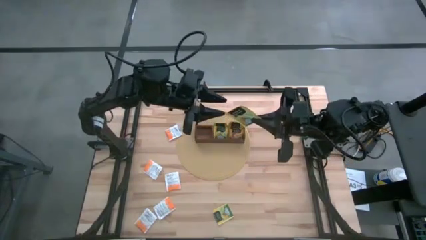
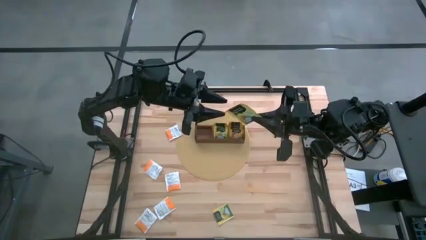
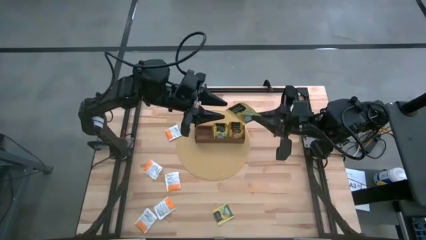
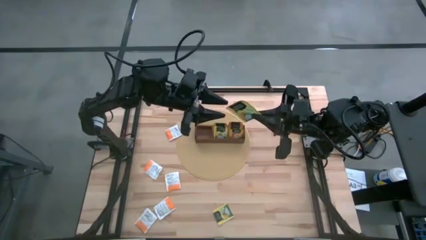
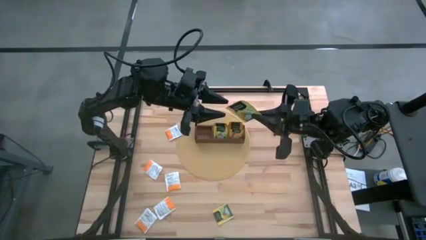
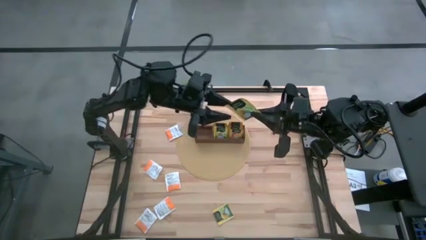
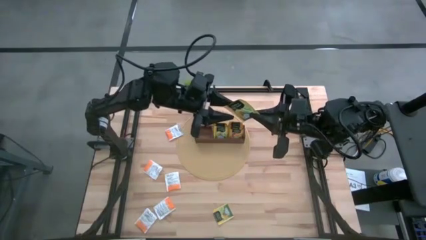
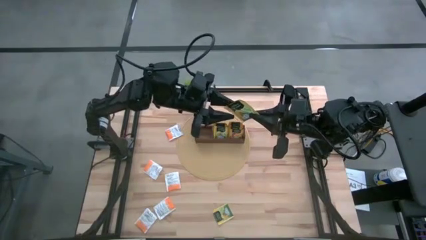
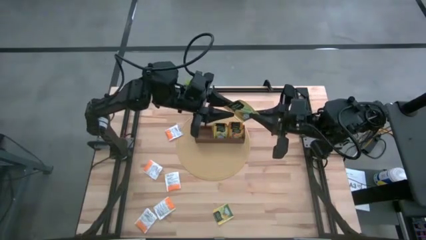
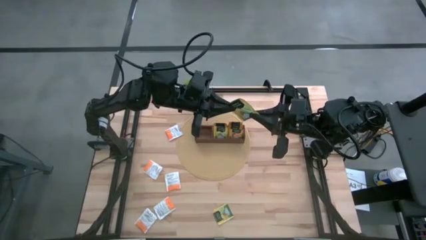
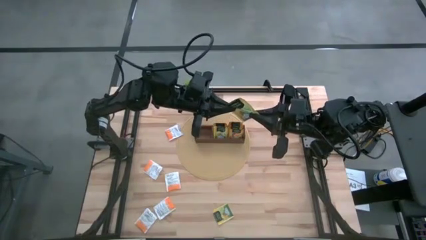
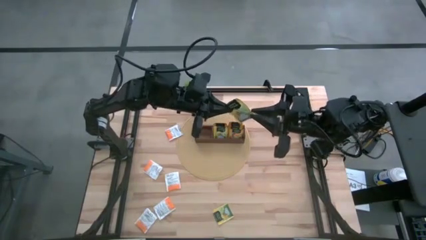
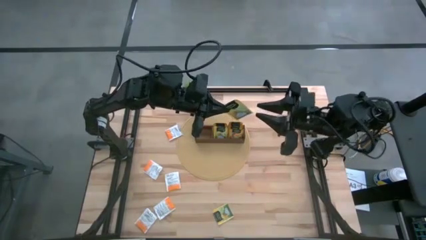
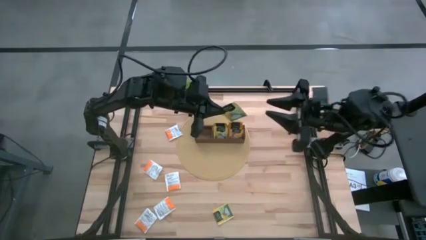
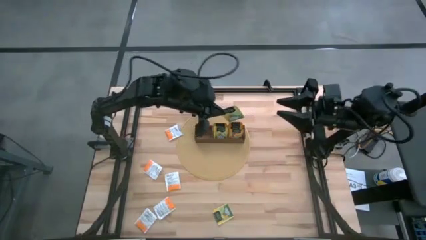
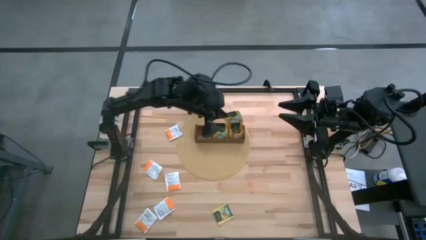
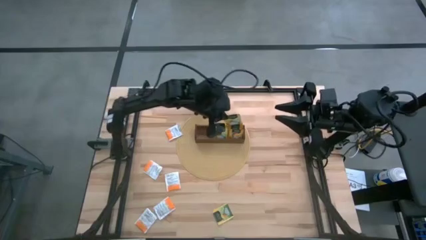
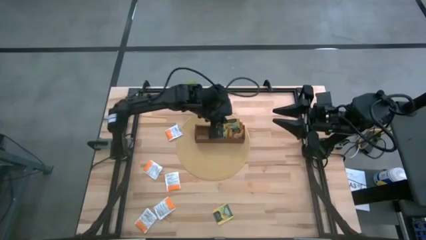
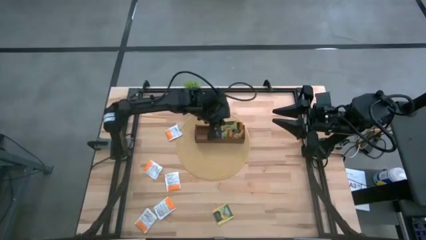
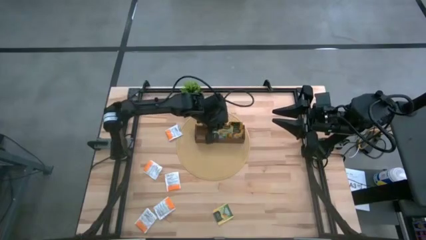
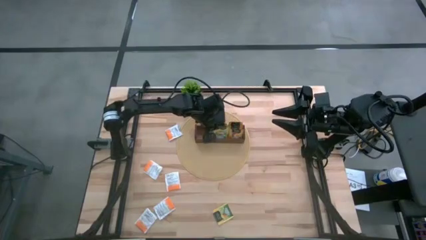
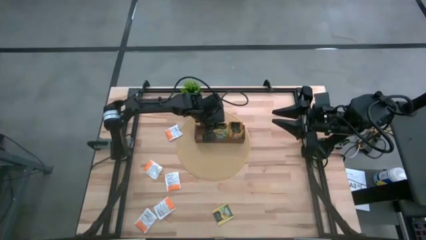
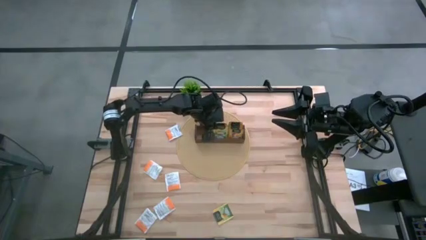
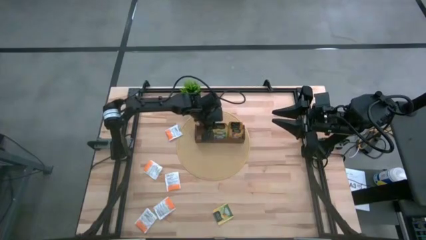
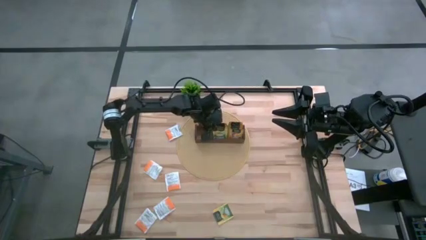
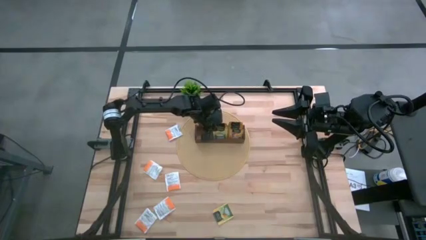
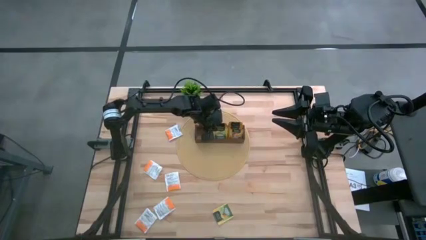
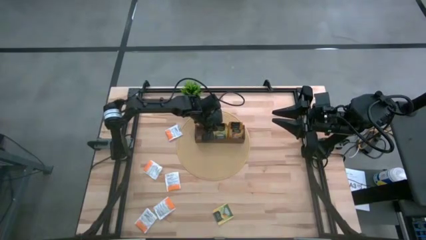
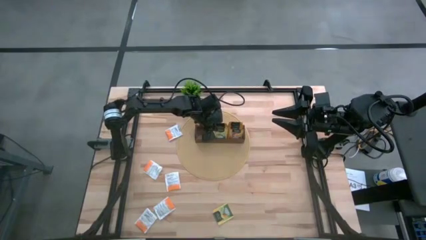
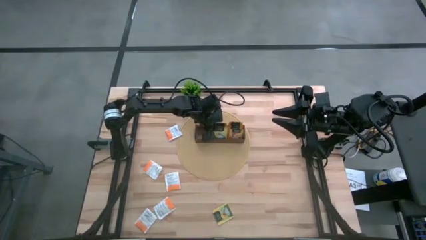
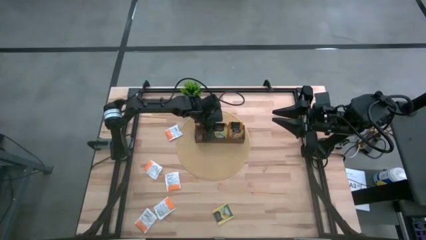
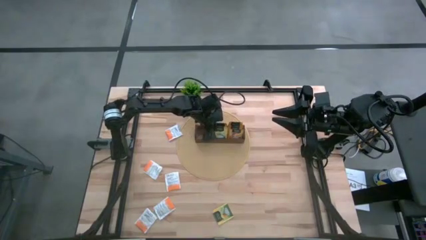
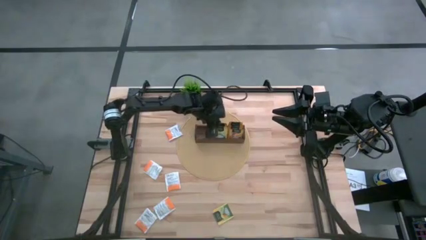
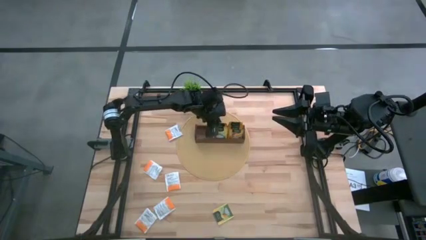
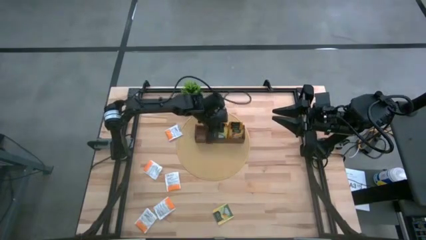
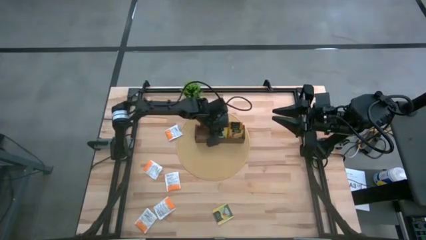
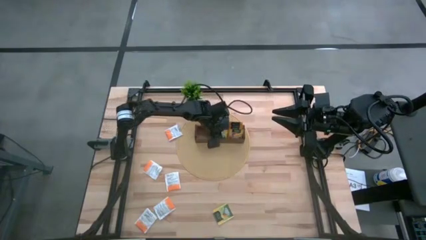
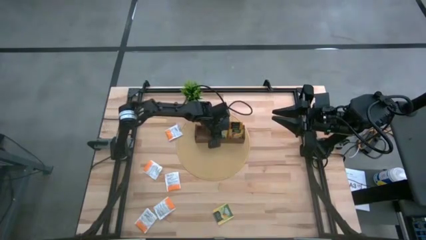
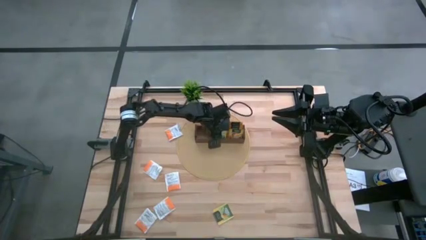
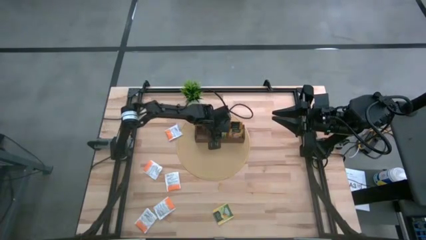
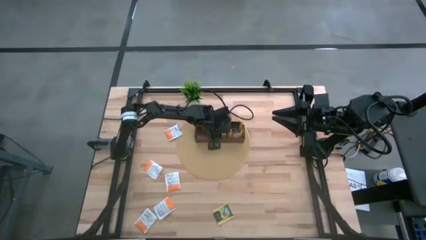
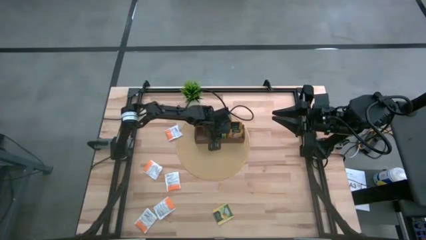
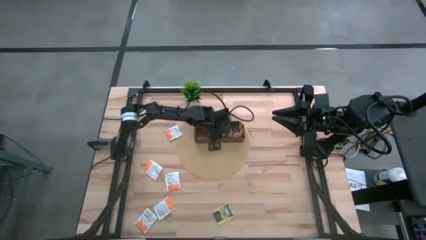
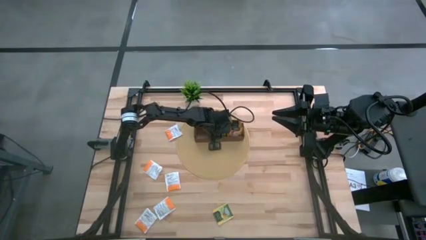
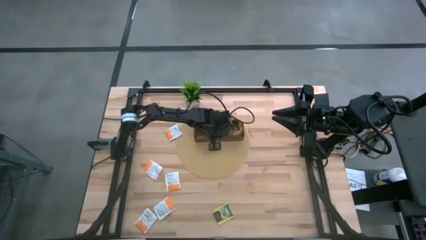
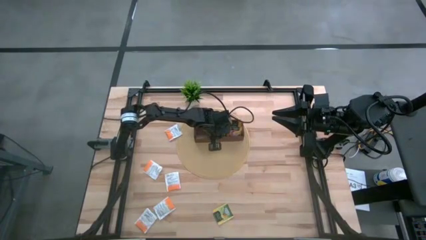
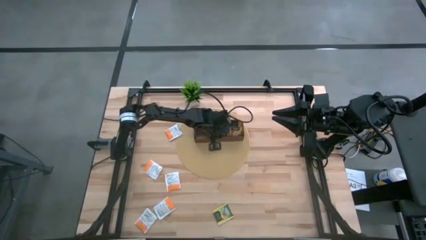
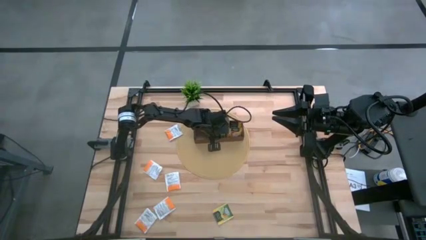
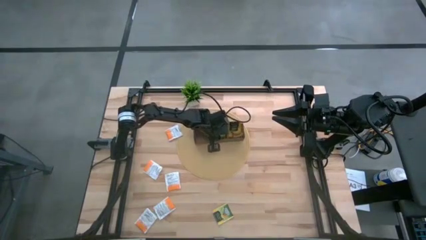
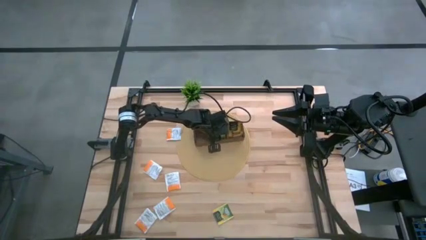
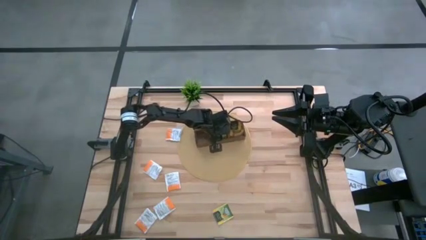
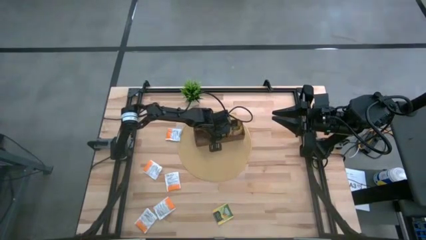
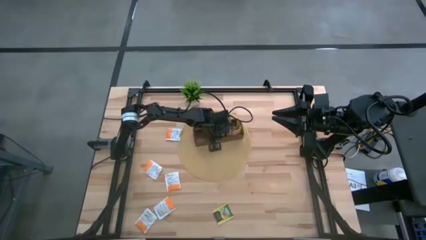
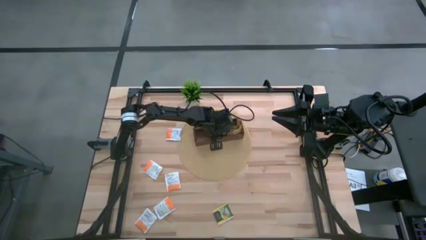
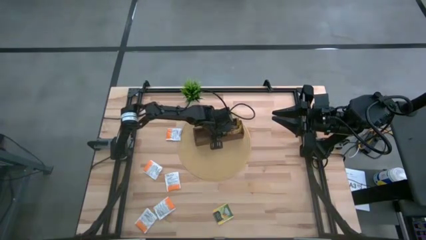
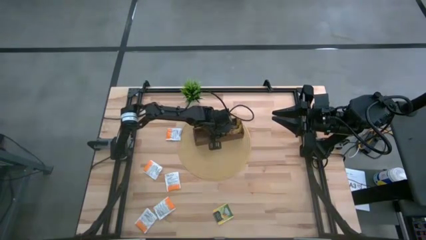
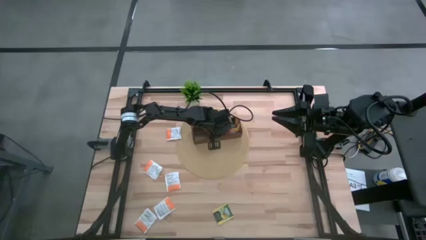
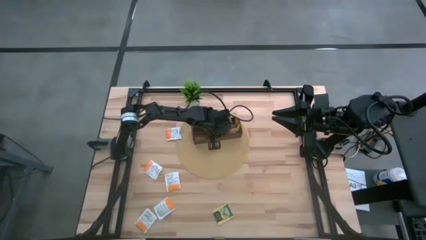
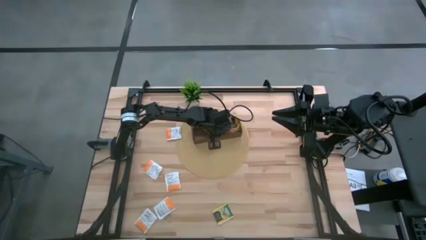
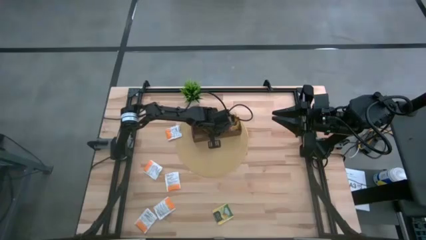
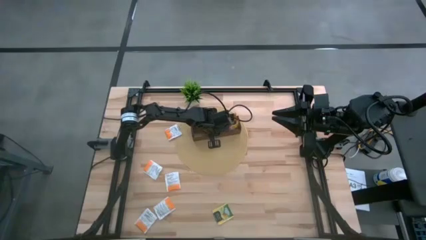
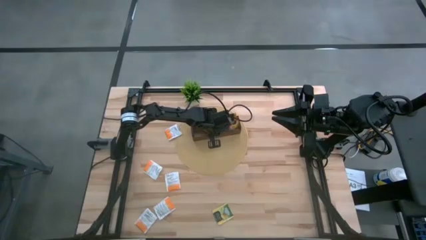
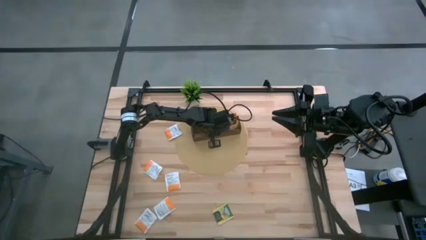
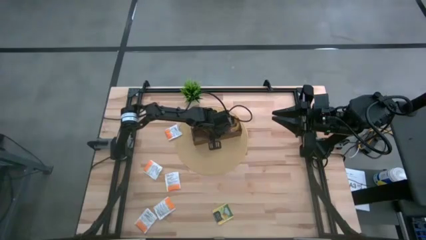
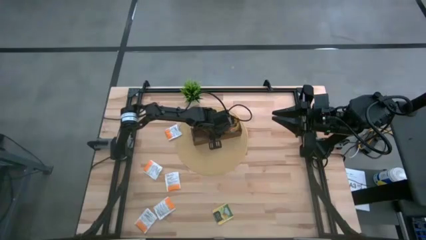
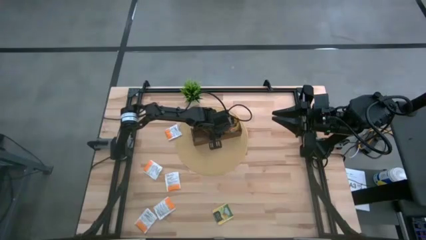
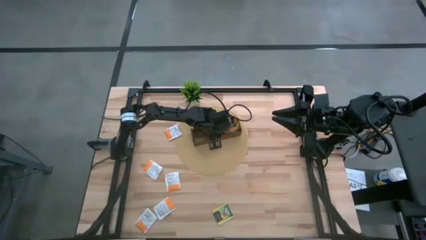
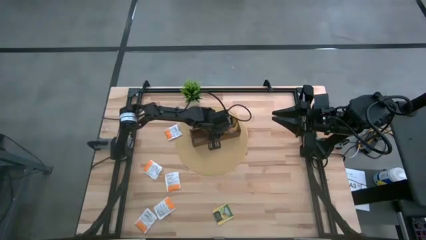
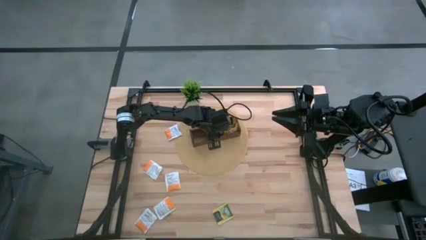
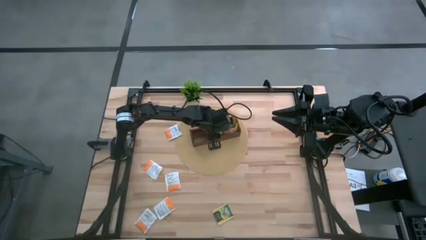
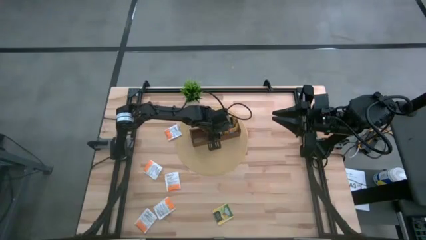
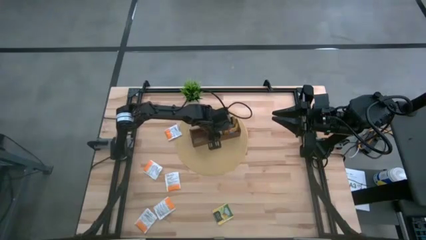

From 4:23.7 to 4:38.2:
Task: Pick & Place Tea
Put the yellow tea bag into the middle section of the wooden organizer

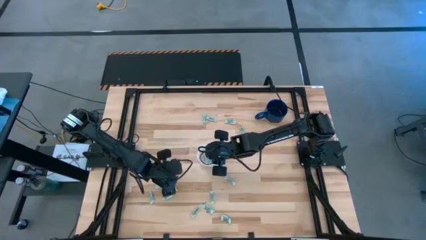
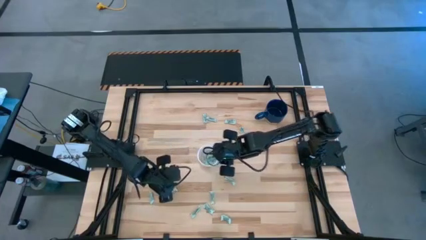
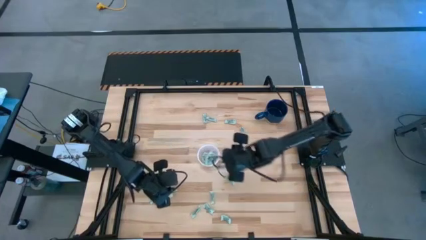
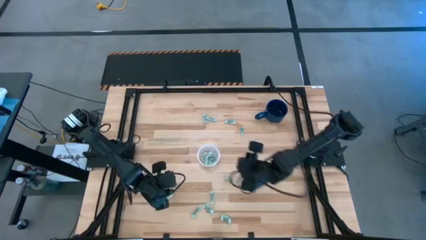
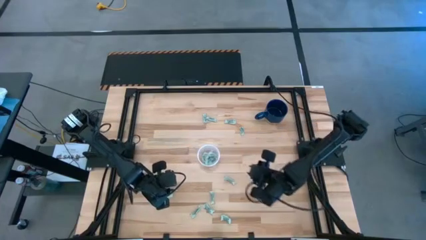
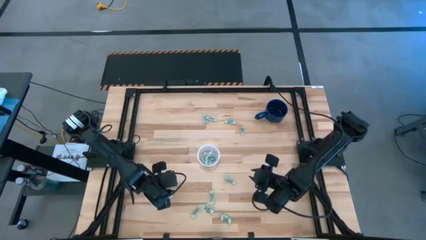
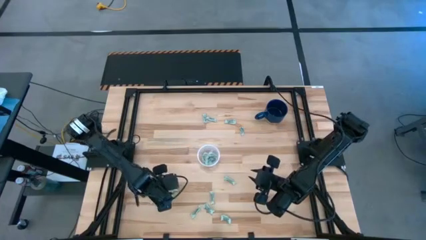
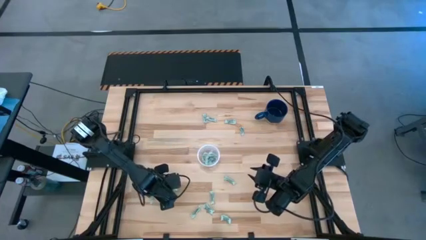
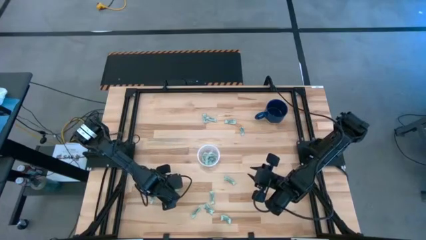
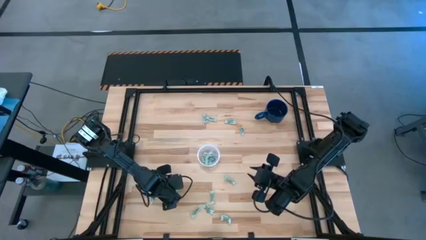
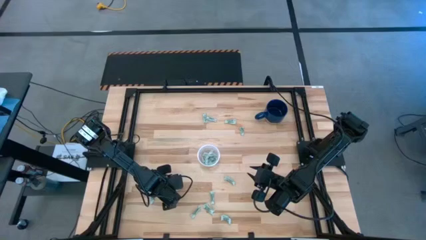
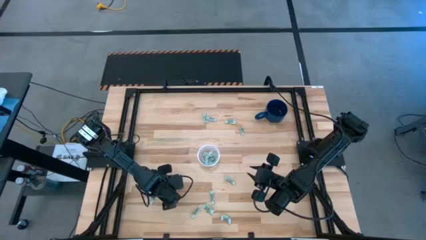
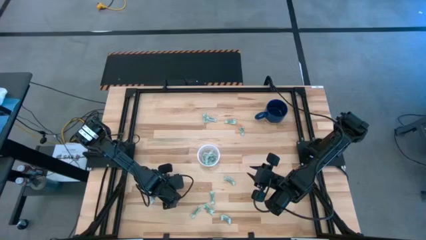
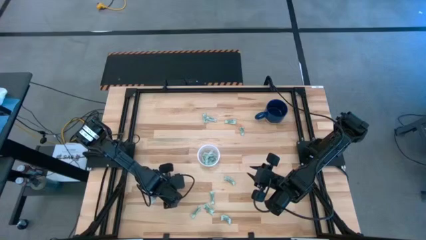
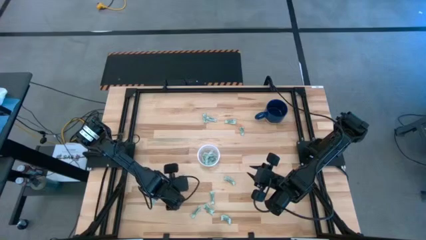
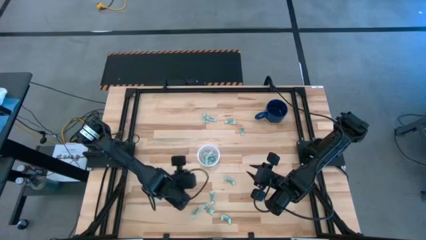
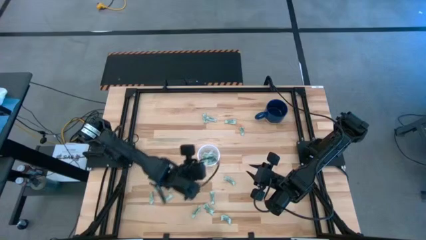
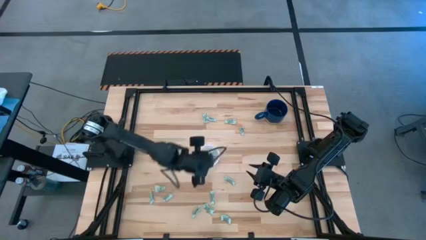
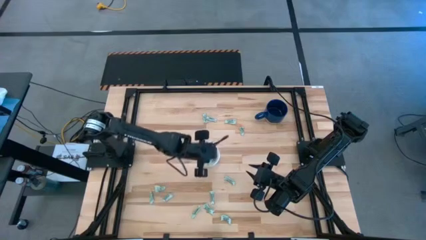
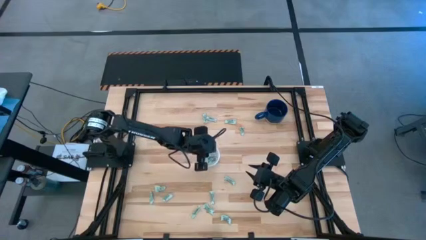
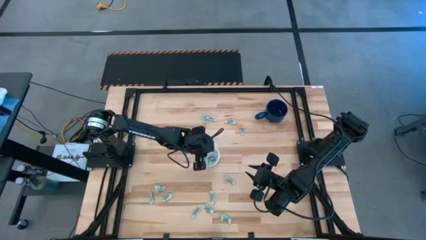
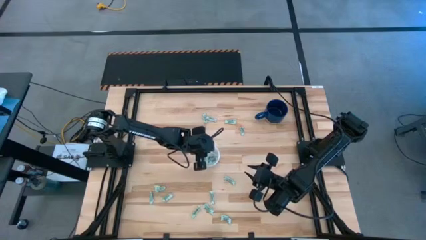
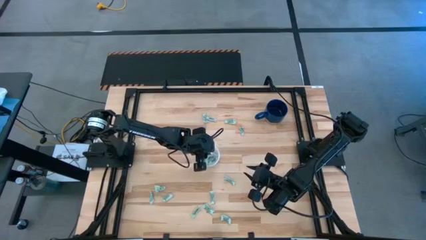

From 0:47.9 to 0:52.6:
Task: Pick and place items into bin
Put the stevia packet into the transparent bin
